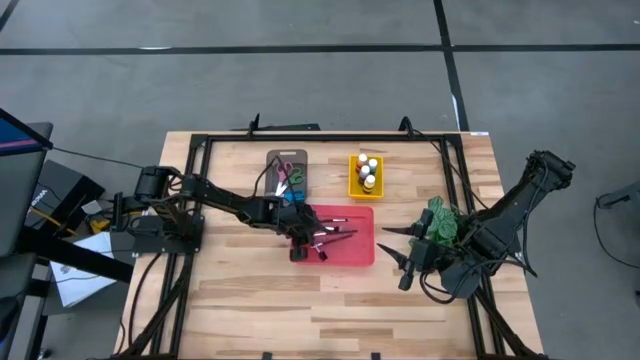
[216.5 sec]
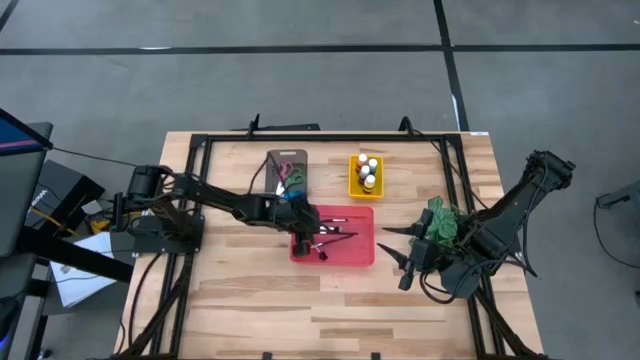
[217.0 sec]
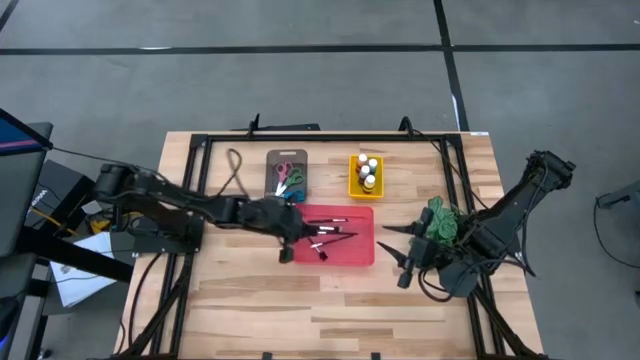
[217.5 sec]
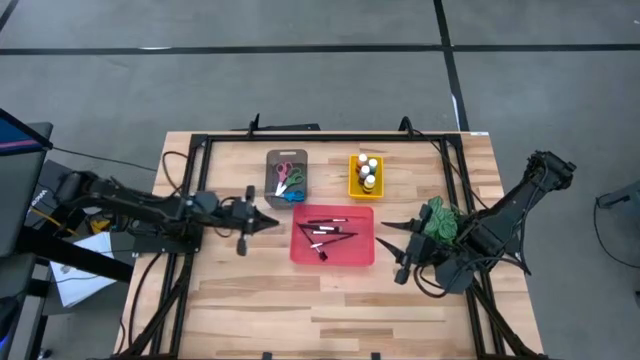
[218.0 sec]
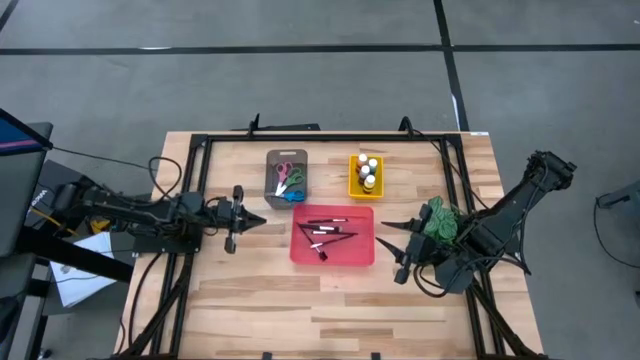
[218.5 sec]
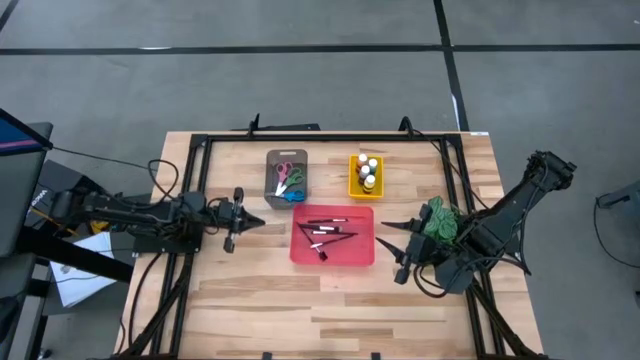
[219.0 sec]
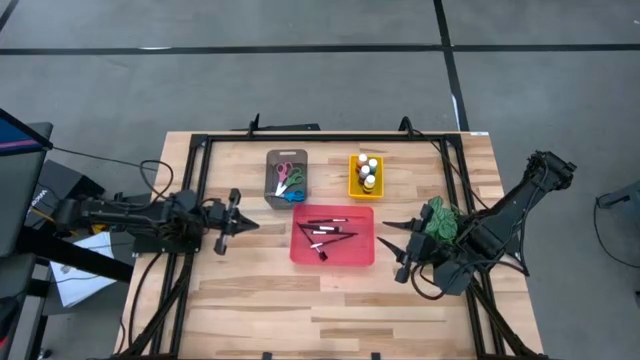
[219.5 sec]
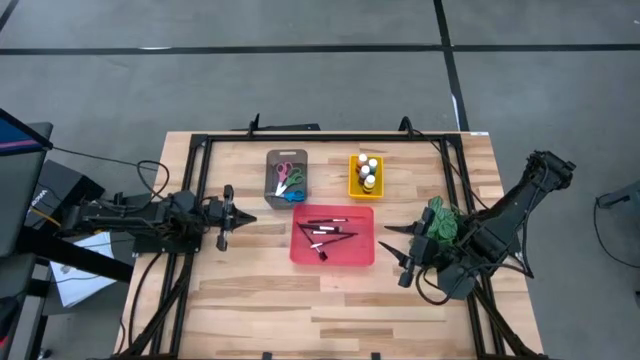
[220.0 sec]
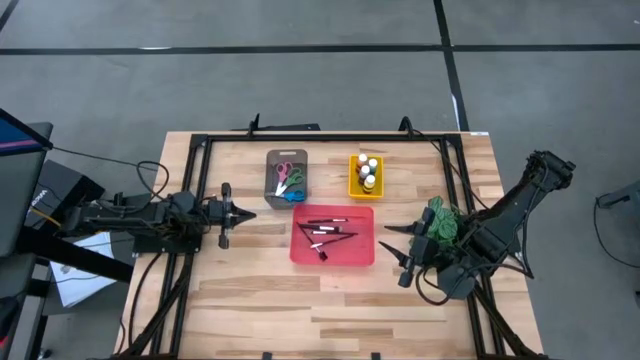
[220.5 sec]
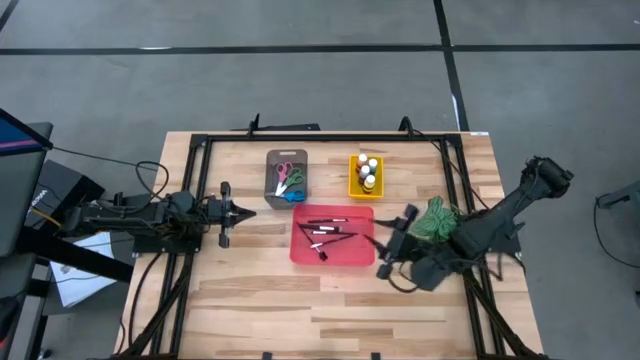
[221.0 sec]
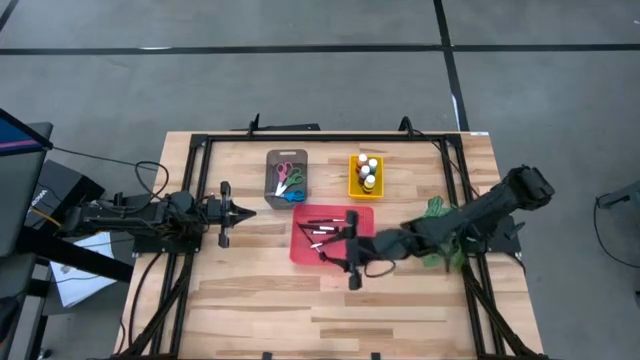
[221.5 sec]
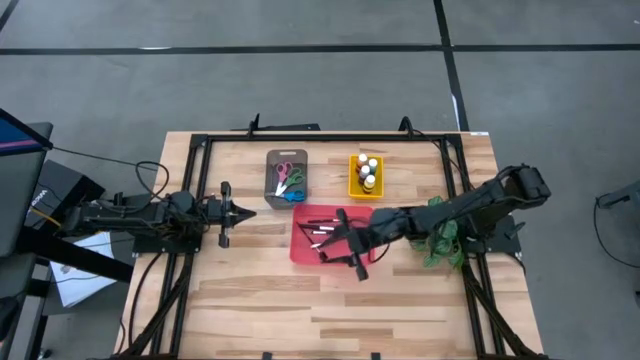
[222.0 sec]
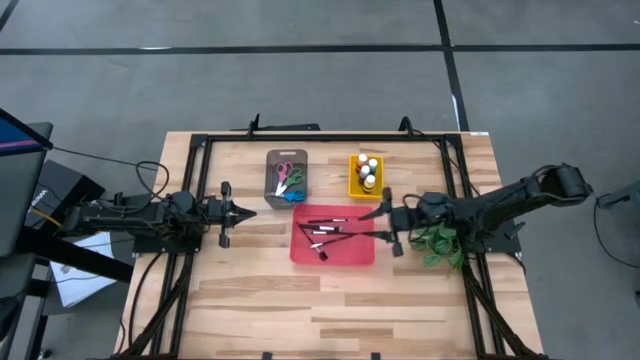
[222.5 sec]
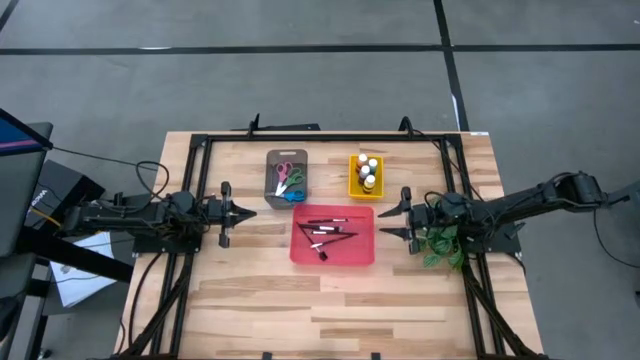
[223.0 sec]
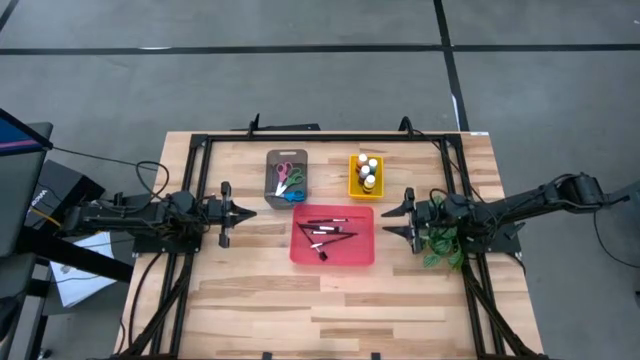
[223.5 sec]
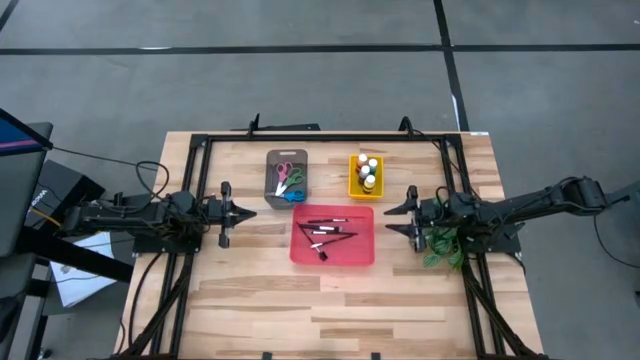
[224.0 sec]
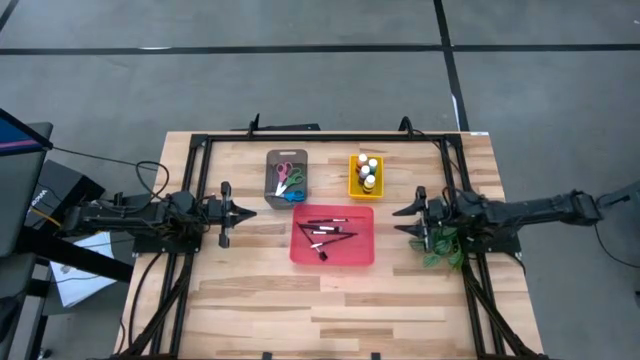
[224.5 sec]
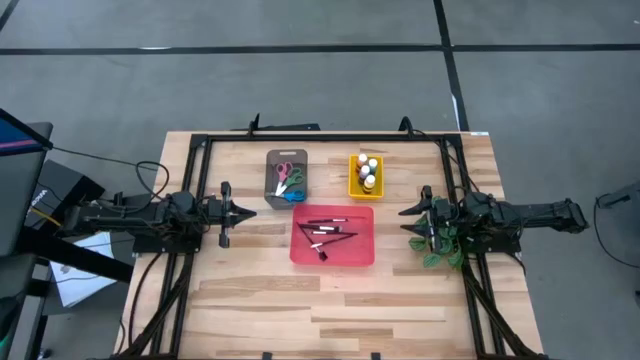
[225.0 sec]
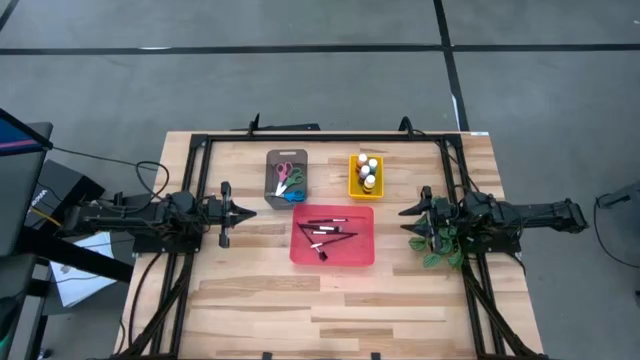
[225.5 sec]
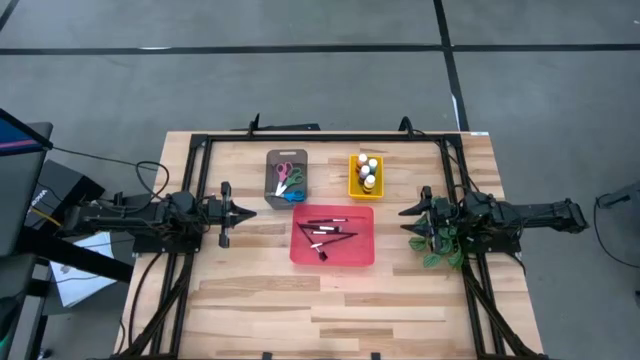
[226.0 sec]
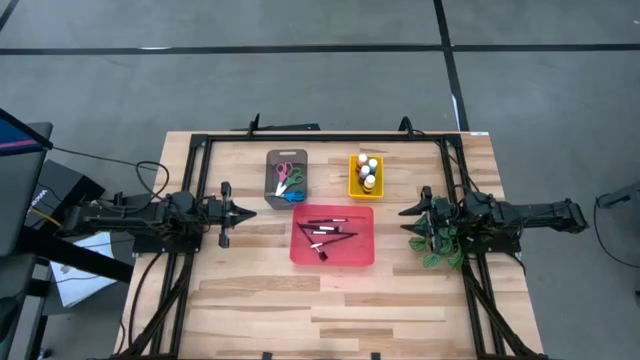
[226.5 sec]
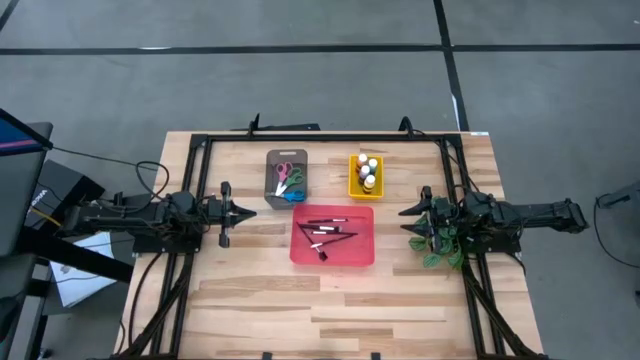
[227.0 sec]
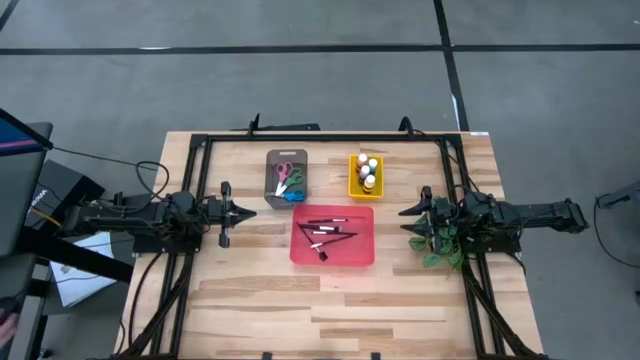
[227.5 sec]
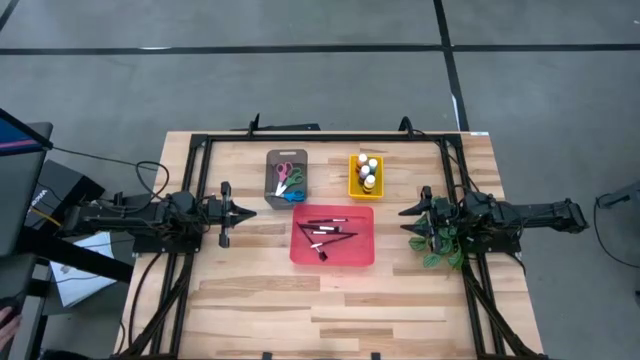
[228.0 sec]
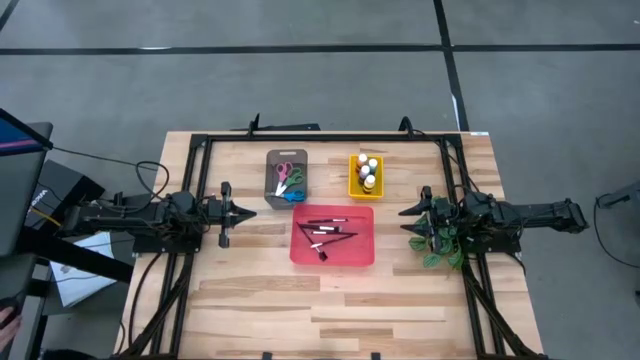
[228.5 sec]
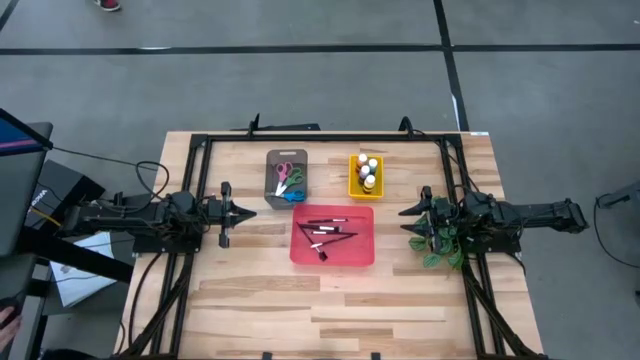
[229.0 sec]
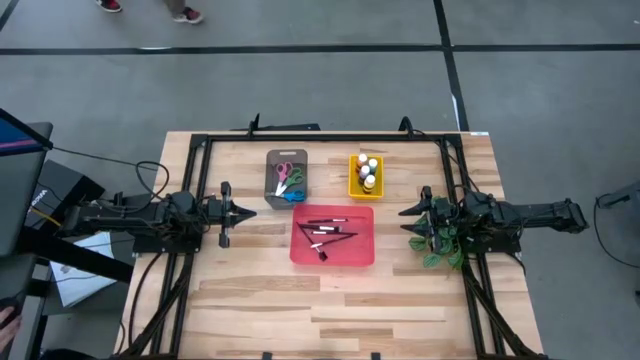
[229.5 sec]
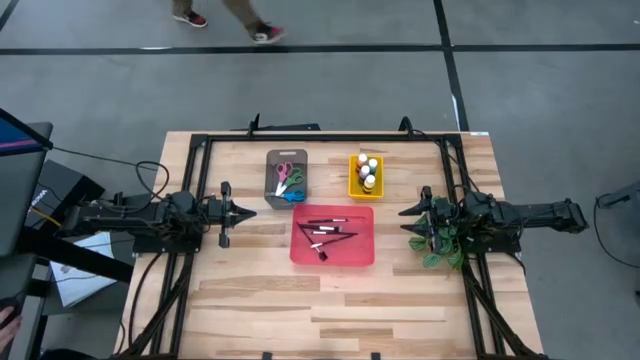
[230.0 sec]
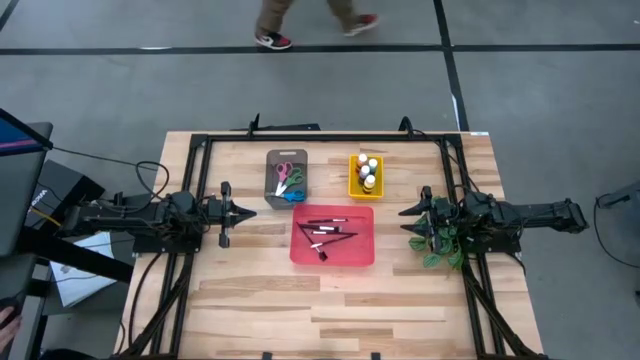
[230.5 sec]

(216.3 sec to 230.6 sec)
Task: Pick & Place Paint Supplies
Return to Home Position

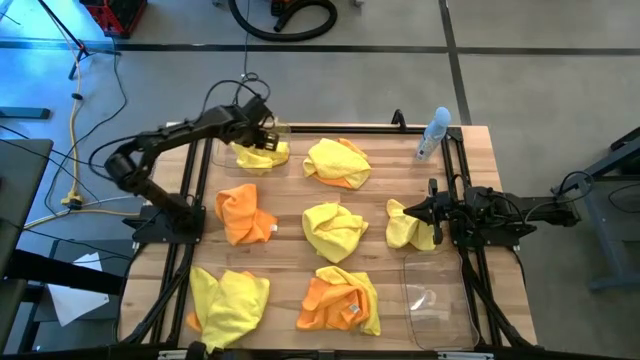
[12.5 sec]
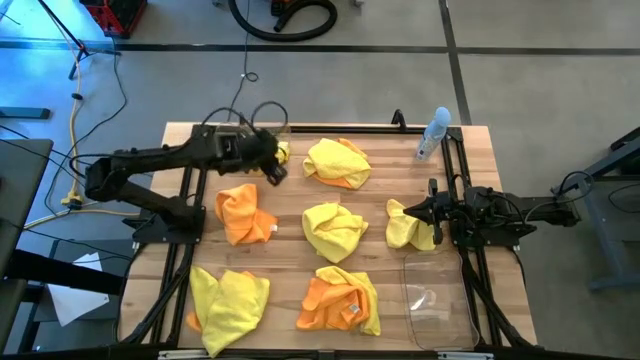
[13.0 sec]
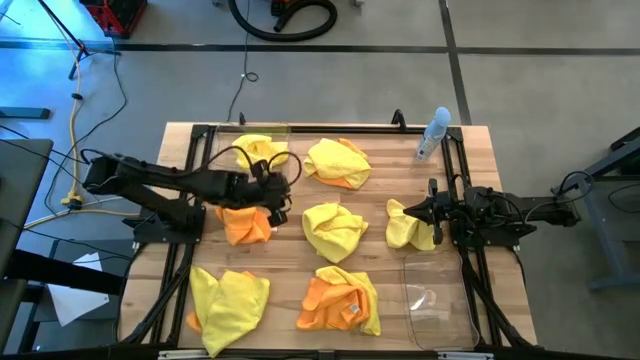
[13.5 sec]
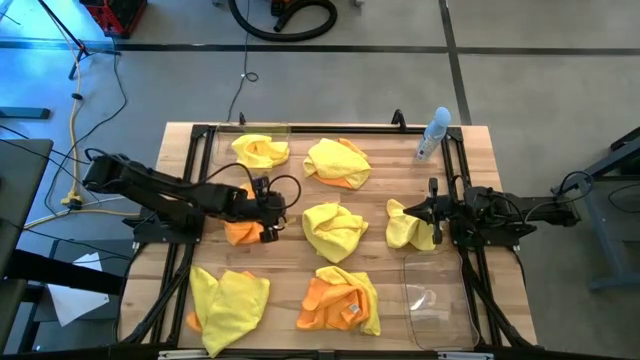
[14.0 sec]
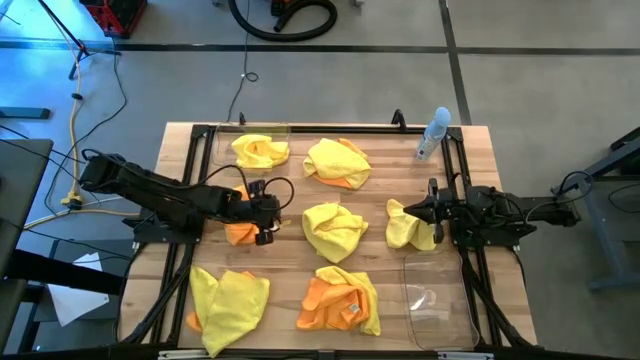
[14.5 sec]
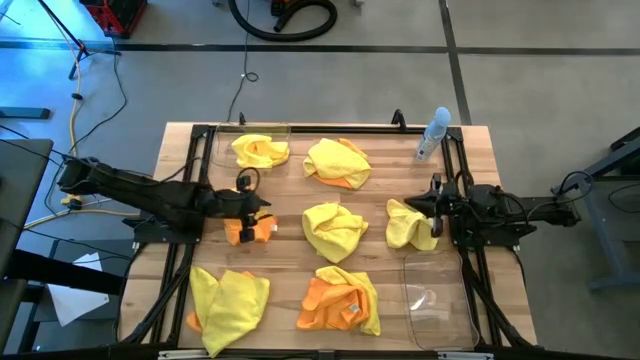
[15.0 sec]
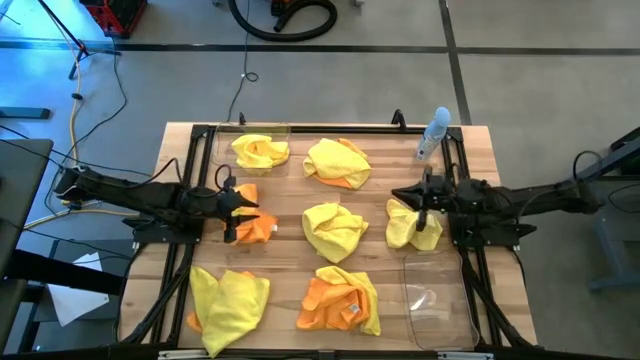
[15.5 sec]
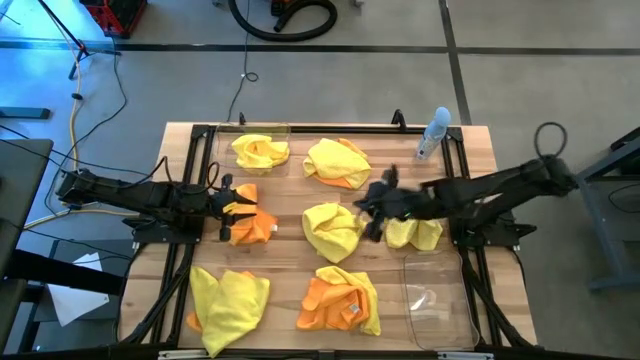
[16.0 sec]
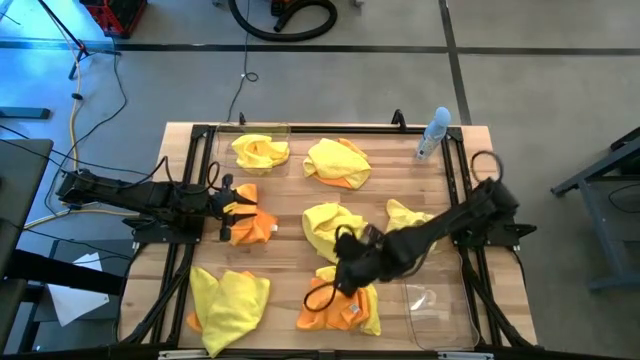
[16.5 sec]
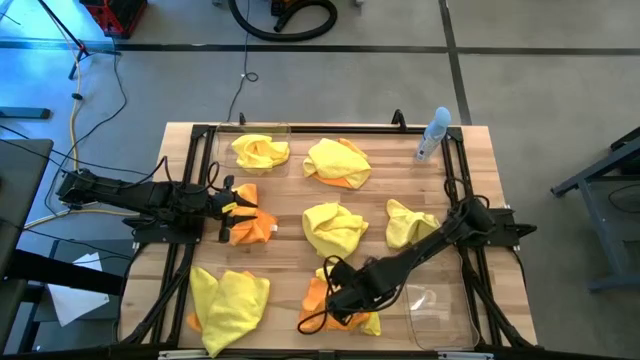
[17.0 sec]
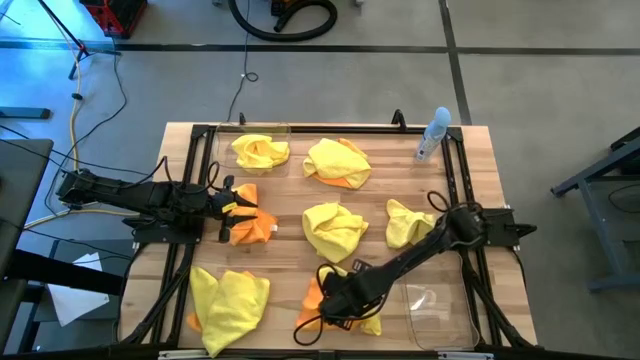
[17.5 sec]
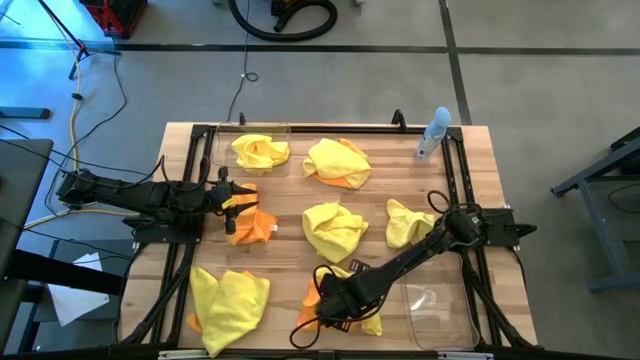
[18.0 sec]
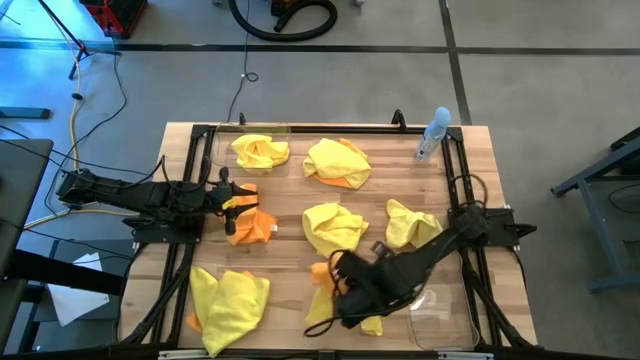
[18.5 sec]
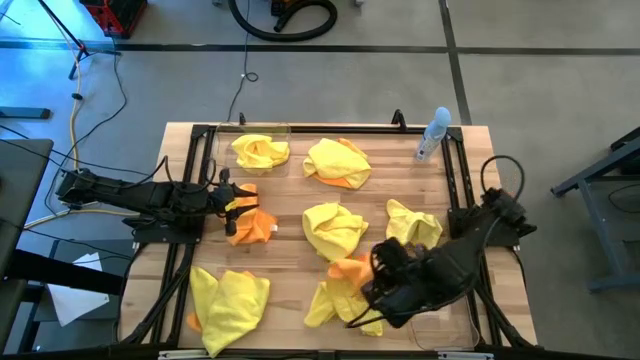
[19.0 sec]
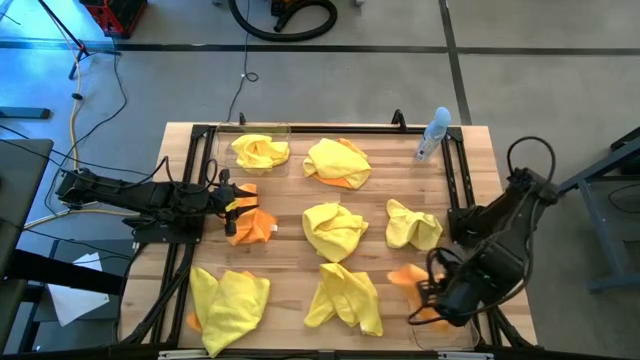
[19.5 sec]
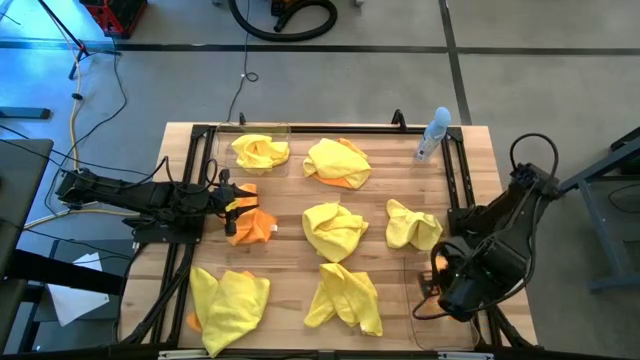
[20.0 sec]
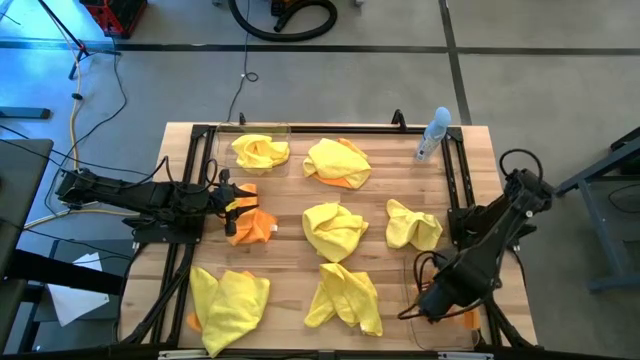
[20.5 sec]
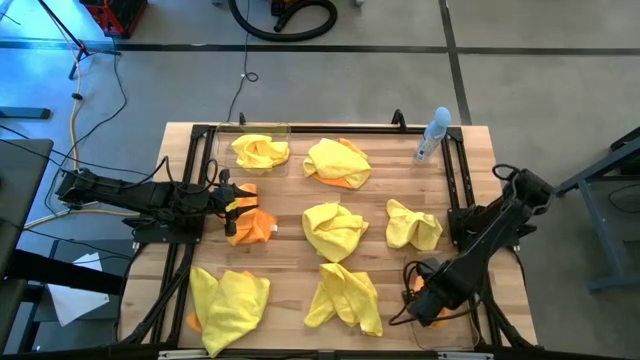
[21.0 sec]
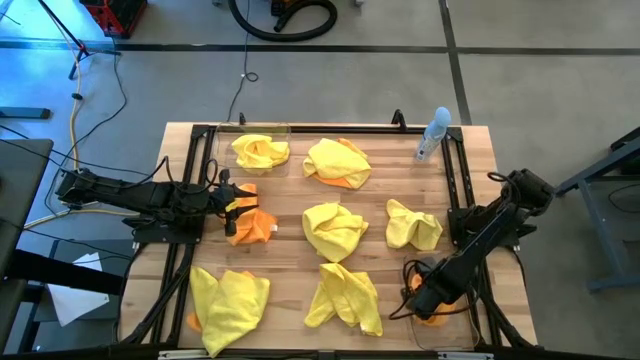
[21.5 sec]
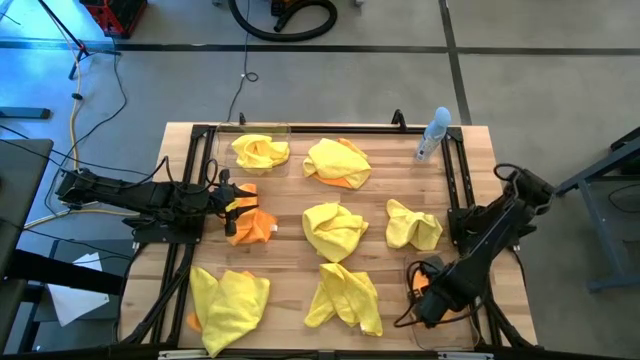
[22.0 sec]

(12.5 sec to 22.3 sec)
Task: Sort microfiber towel by color & place in baskets
Put the orange towel into the bottom transparent bin
